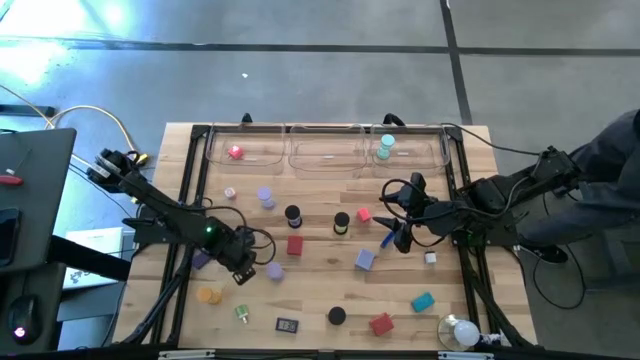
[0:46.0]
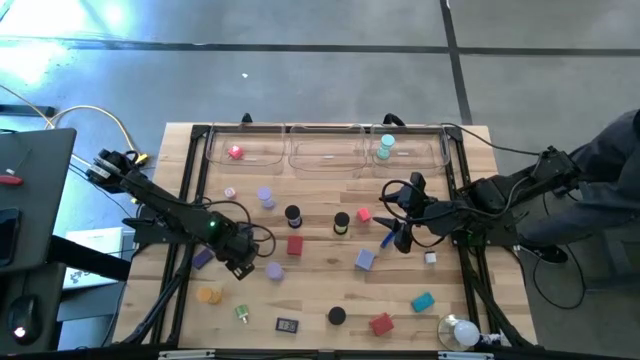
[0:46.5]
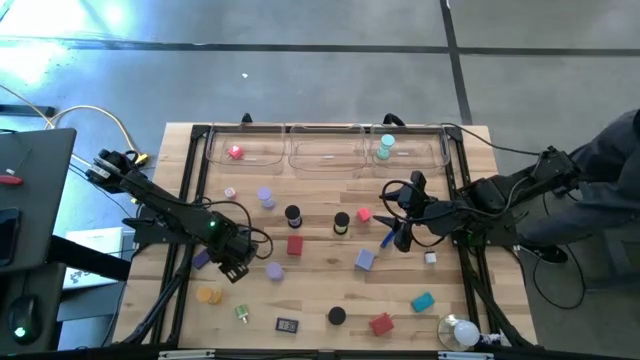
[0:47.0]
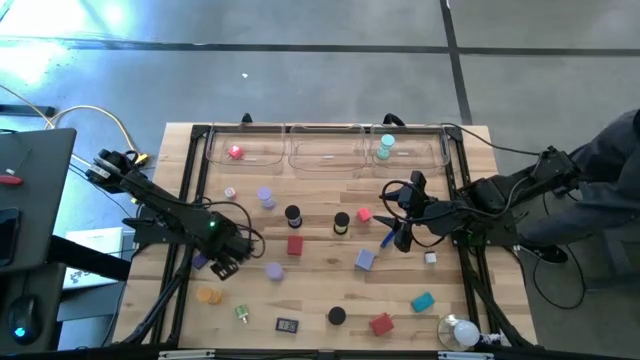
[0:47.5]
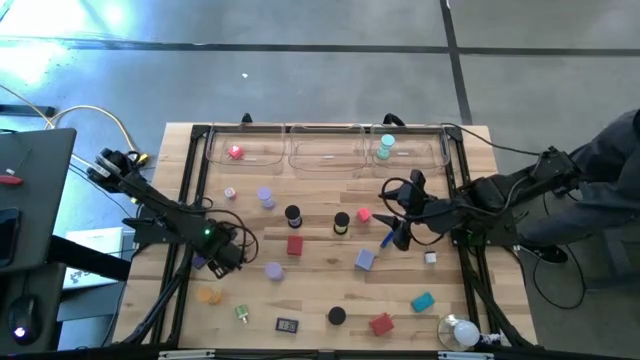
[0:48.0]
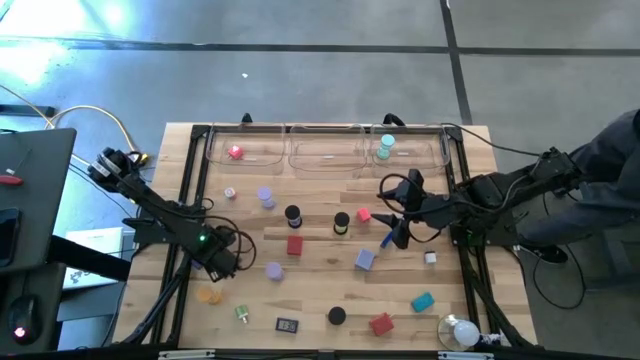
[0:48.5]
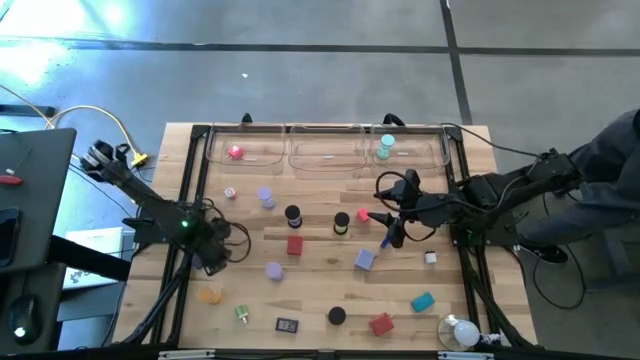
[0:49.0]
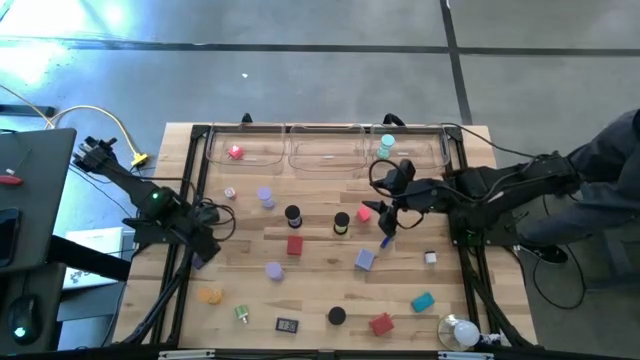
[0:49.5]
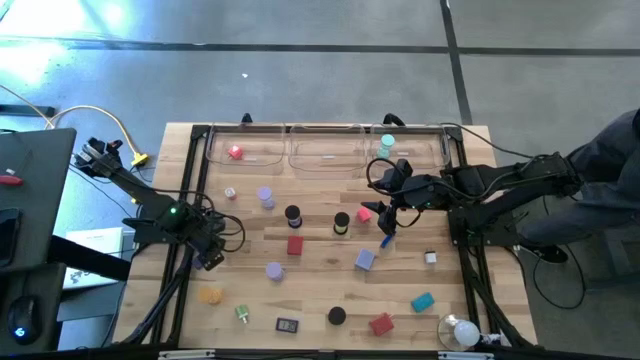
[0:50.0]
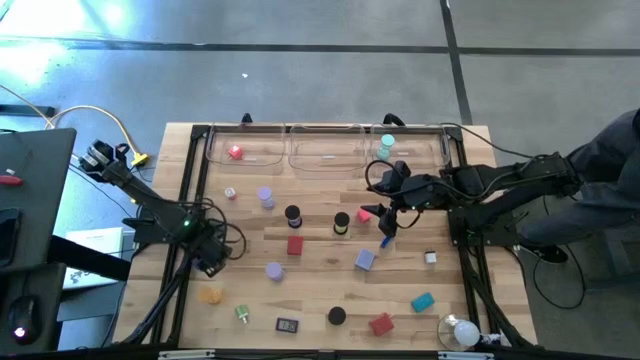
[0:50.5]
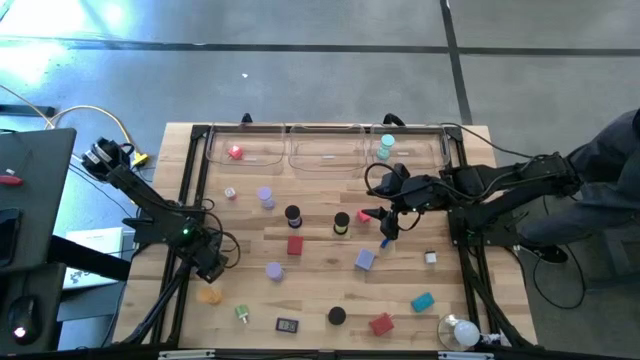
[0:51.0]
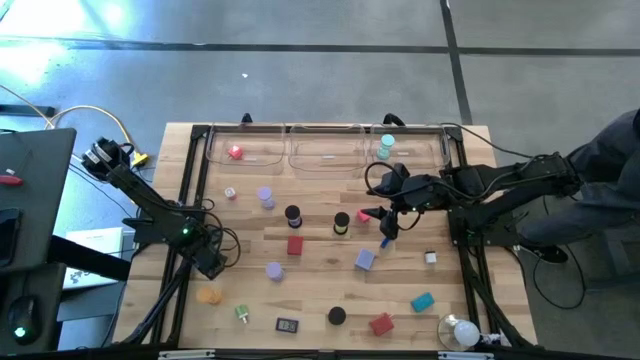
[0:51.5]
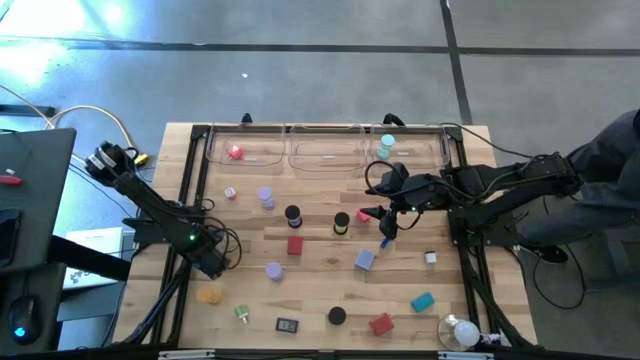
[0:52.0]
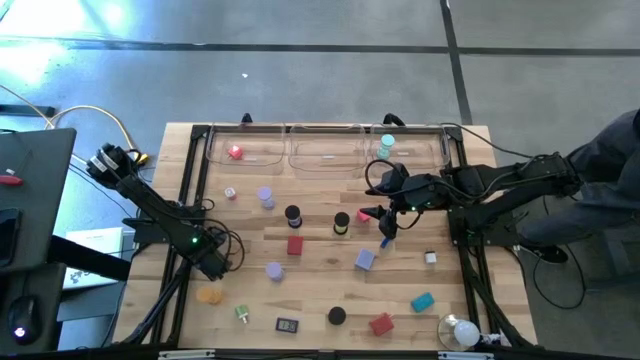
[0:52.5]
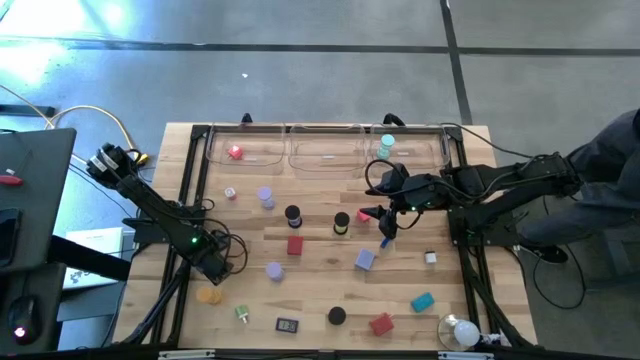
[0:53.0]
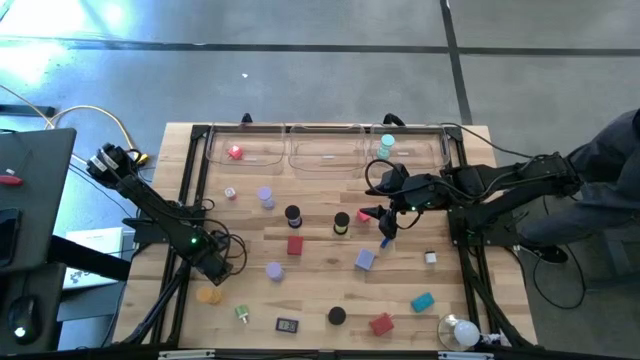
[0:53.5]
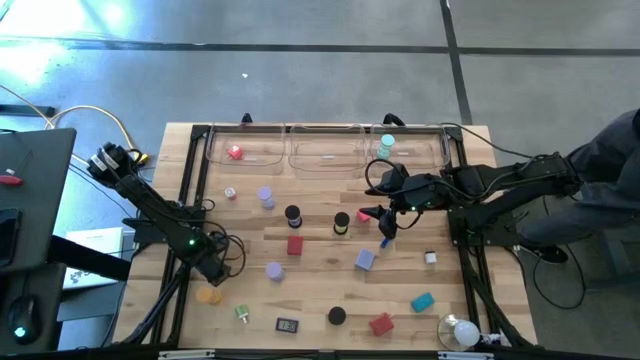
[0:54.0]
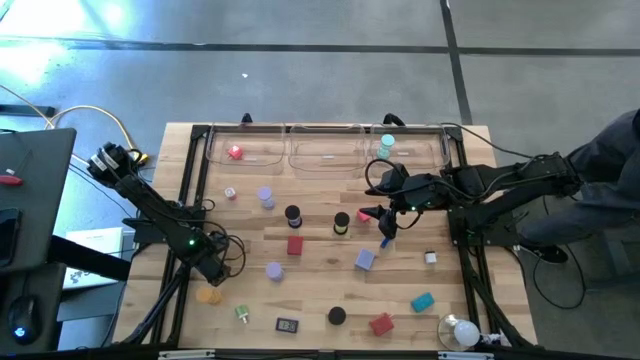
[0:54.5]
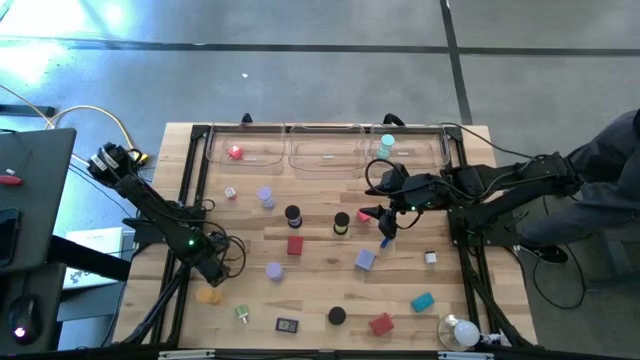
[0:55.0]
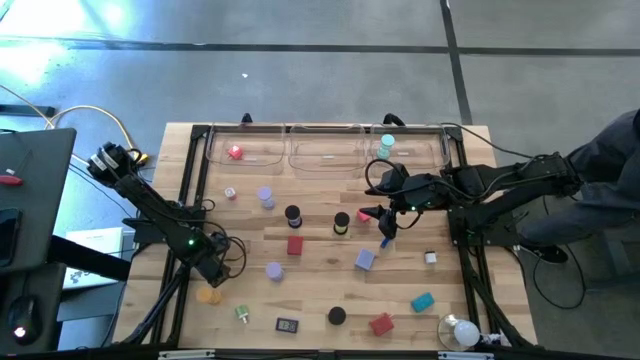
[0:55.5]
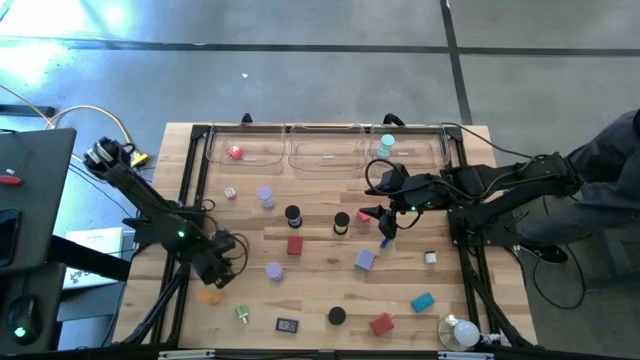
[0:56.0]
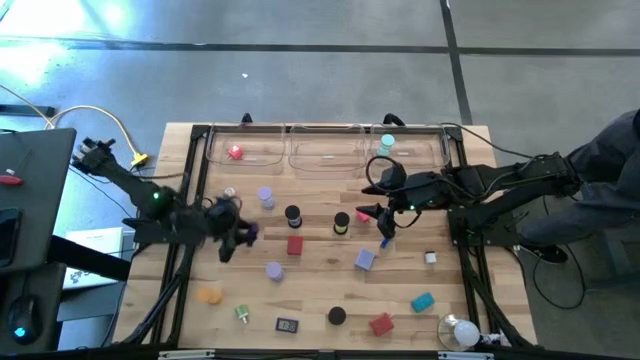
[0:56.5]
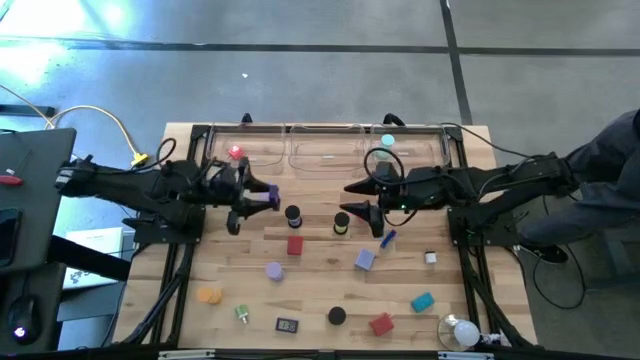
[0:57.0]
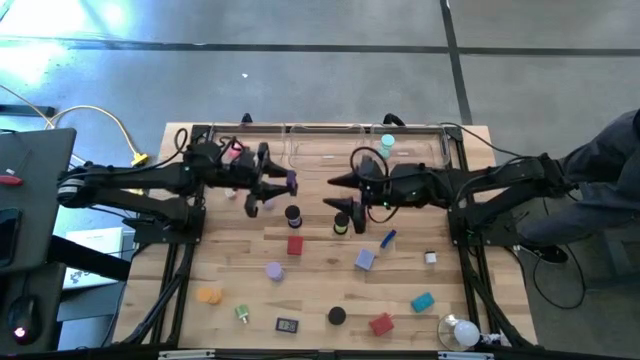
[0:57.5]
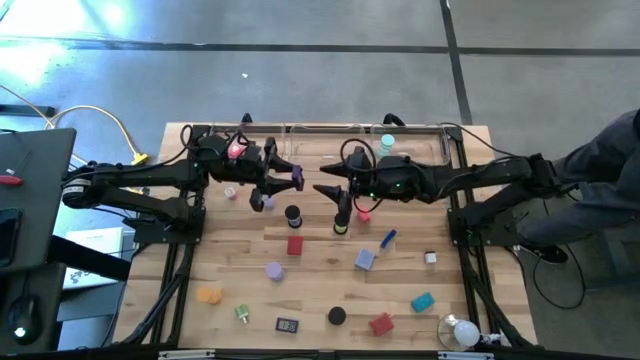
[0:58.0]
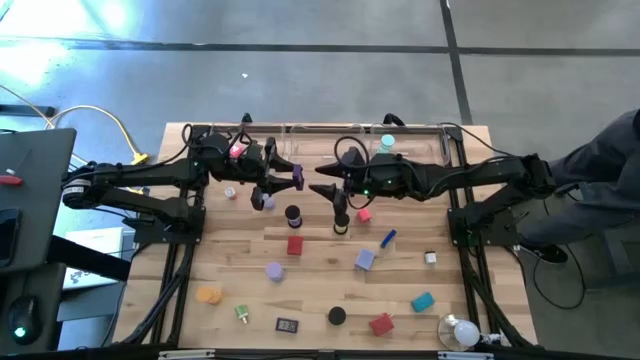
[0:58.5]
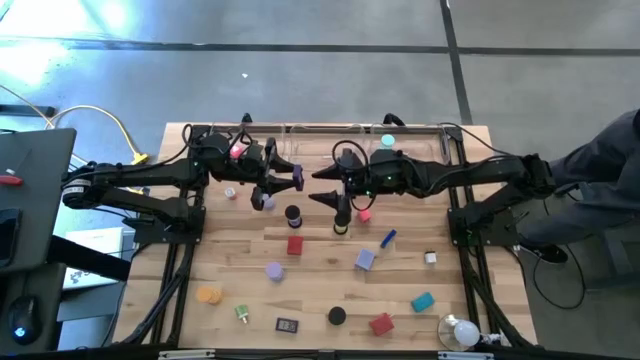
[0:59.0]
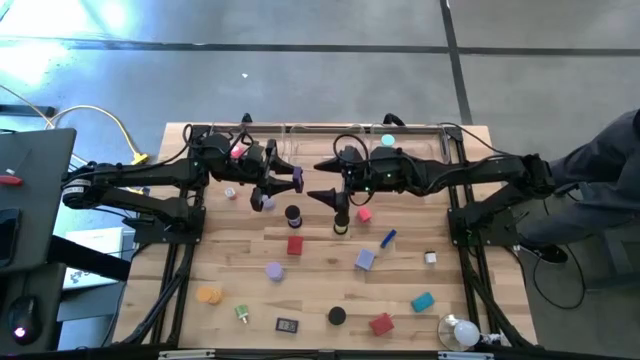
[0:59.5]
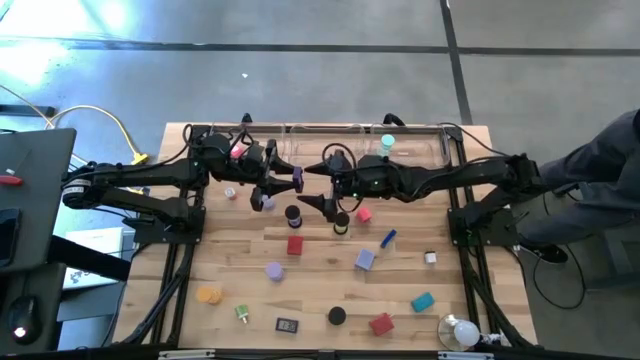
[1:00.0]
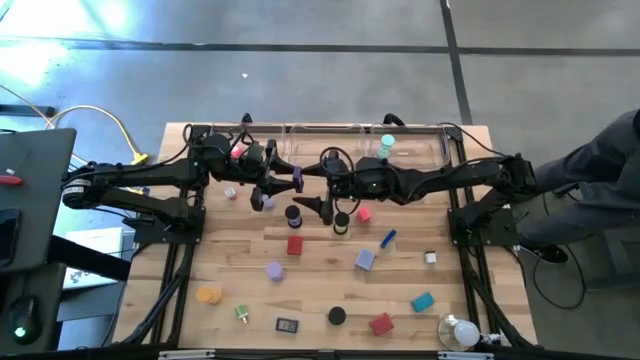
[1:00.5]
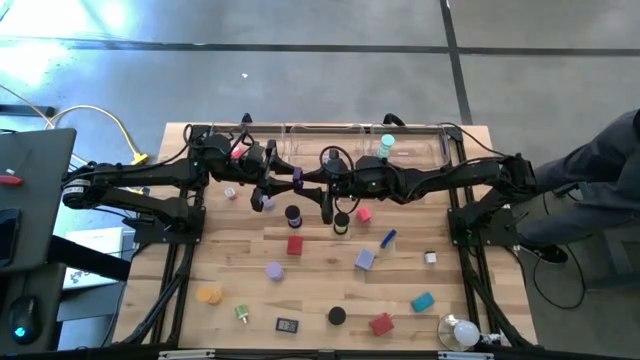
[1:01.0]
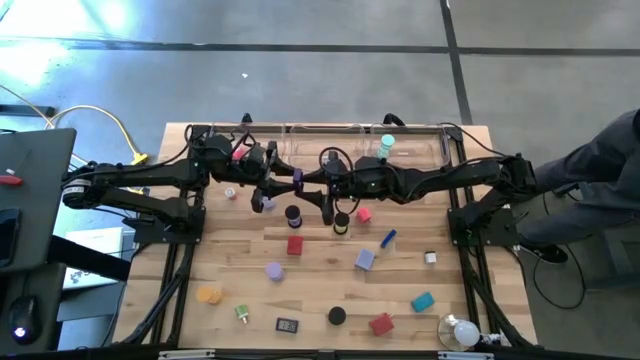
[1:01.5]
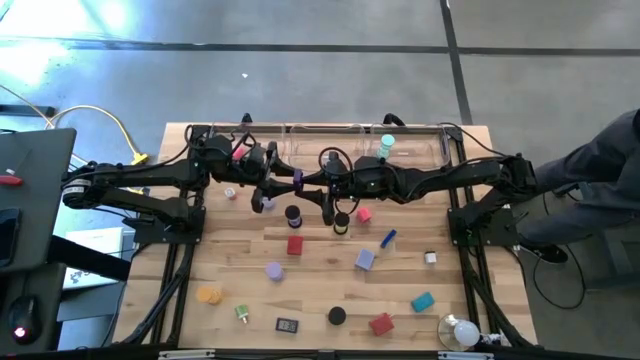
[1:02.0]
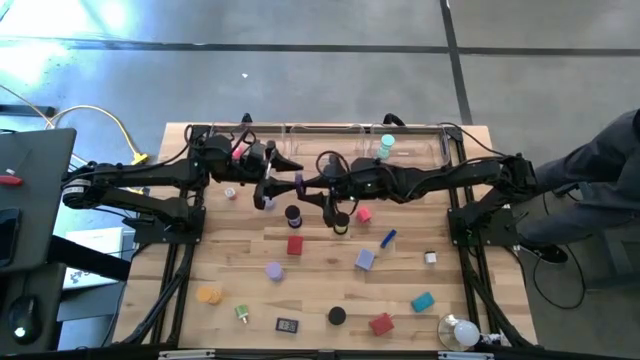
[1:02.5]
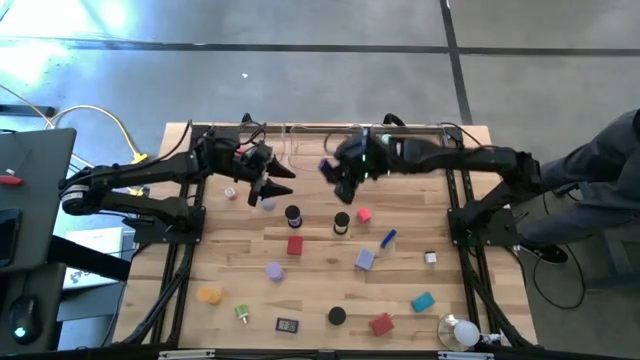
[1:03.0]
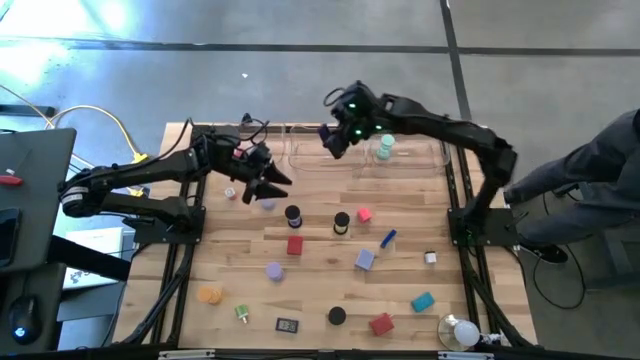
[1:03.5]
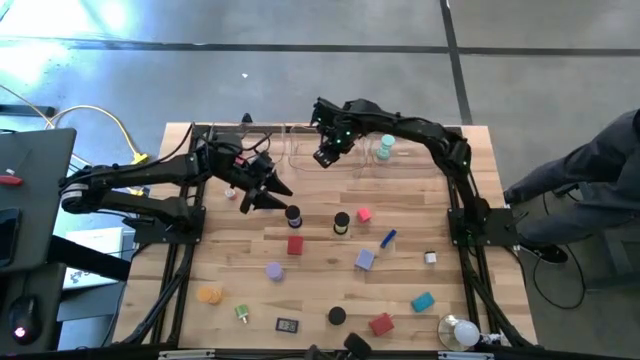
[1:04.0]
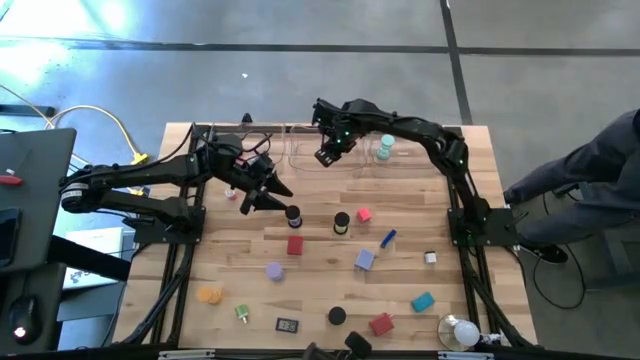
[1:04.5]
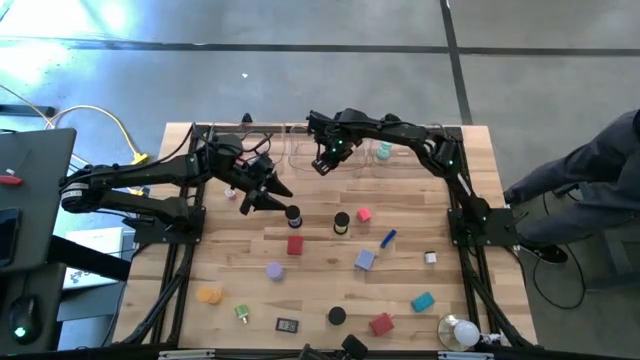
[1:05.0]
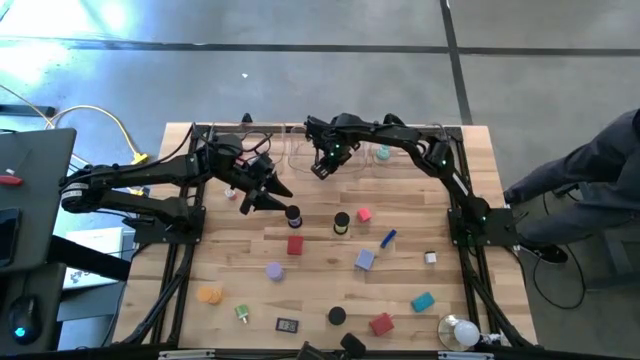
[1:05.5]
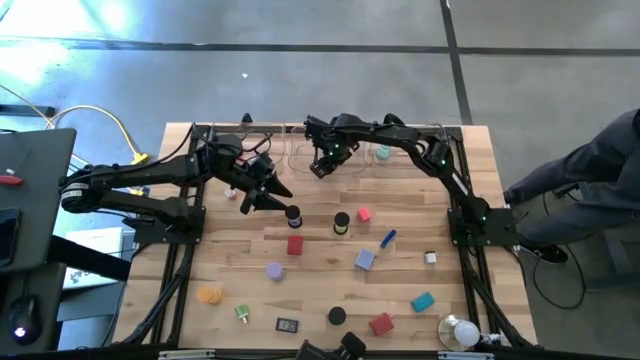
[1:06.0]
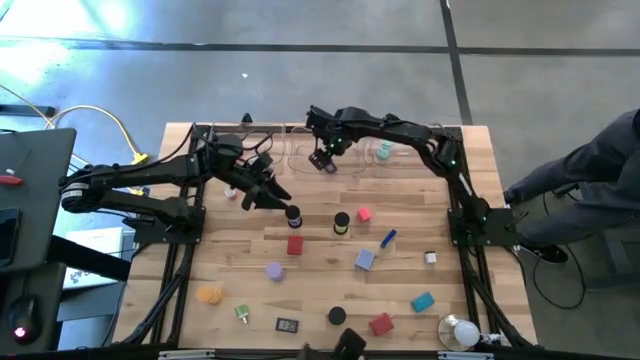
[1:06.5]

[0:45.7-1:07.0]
Task: Pick & Place Office items
Put the left blue digital clock into the middle transparent bin
